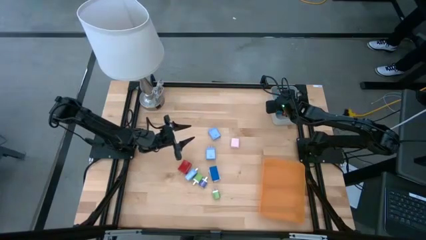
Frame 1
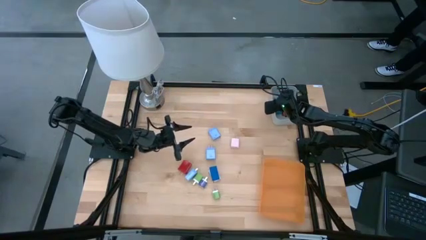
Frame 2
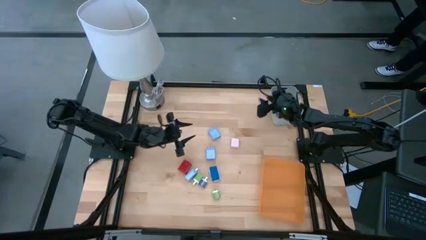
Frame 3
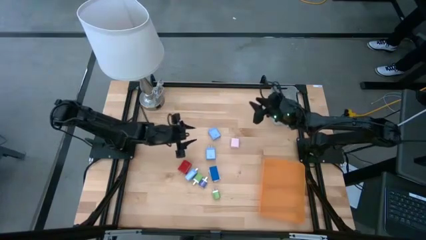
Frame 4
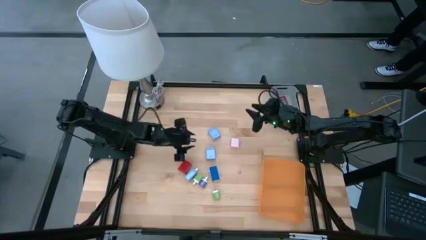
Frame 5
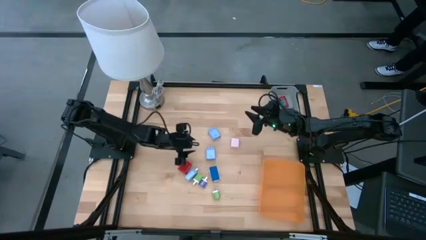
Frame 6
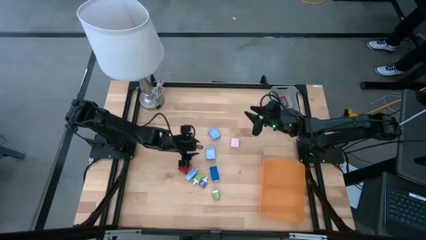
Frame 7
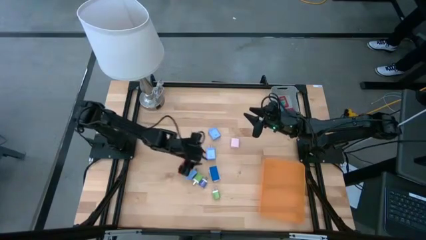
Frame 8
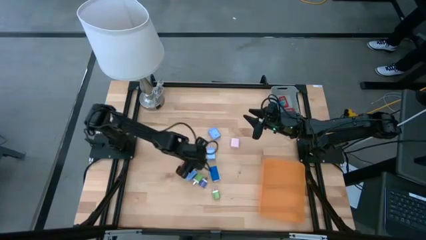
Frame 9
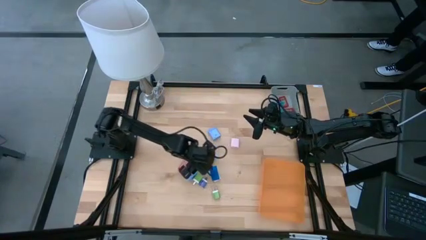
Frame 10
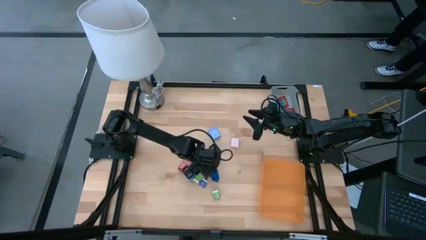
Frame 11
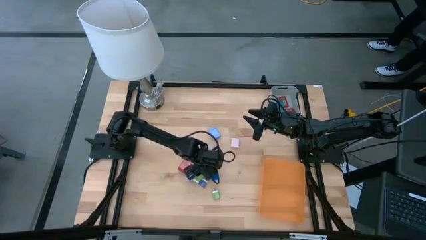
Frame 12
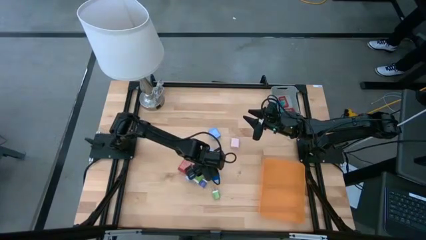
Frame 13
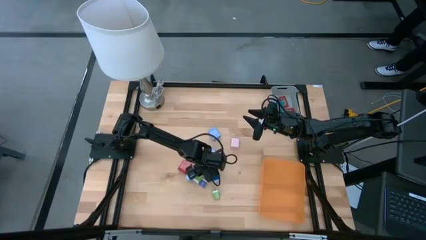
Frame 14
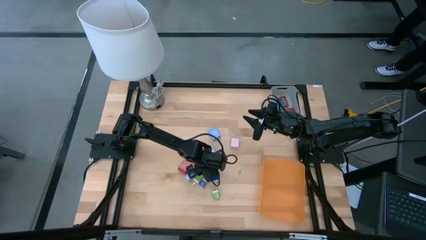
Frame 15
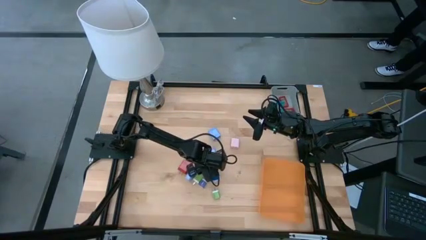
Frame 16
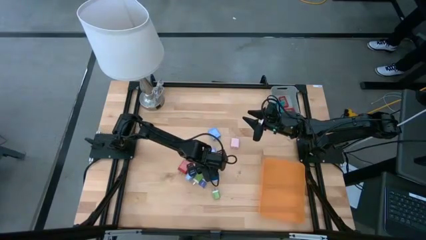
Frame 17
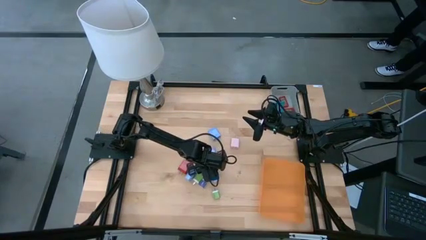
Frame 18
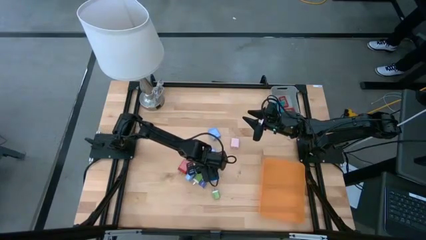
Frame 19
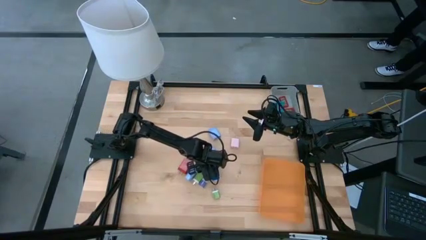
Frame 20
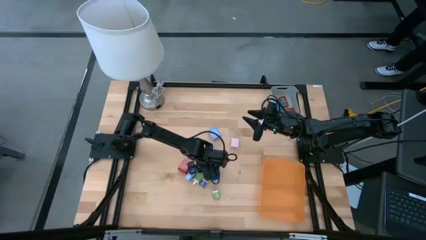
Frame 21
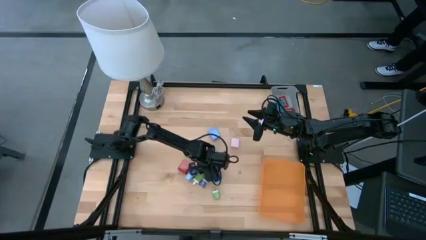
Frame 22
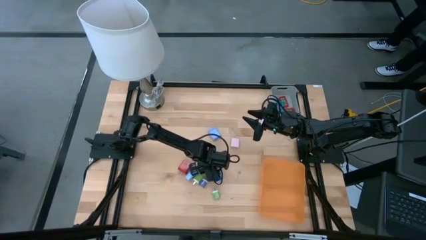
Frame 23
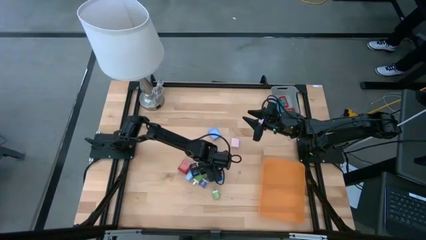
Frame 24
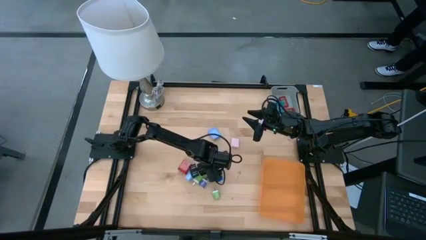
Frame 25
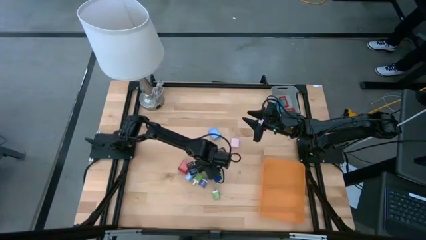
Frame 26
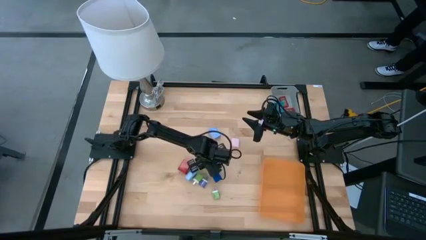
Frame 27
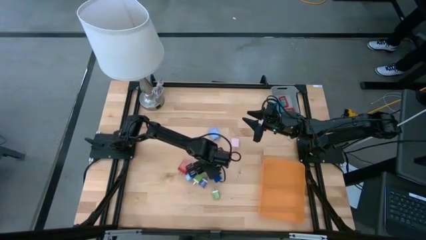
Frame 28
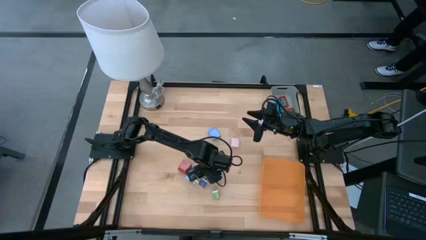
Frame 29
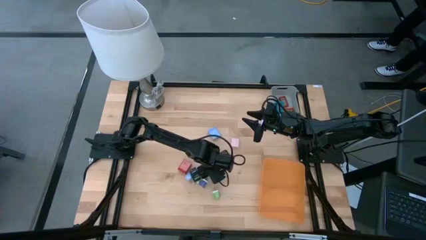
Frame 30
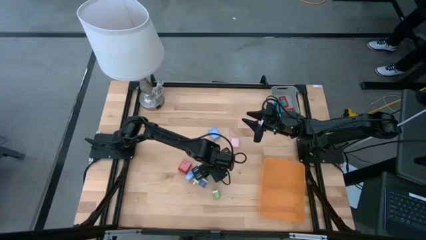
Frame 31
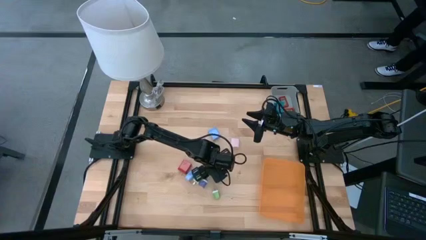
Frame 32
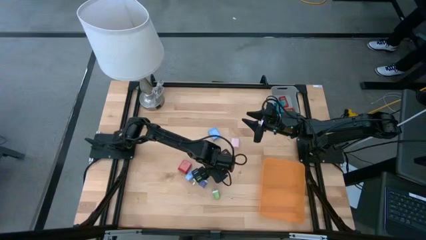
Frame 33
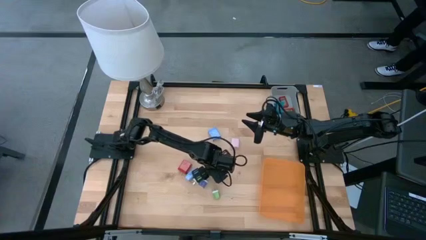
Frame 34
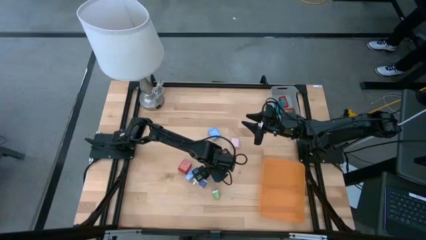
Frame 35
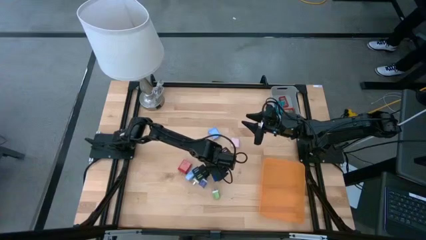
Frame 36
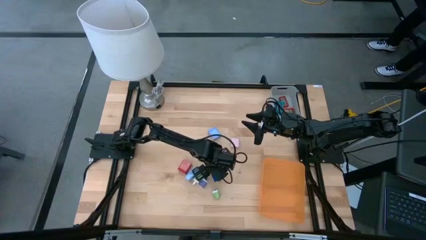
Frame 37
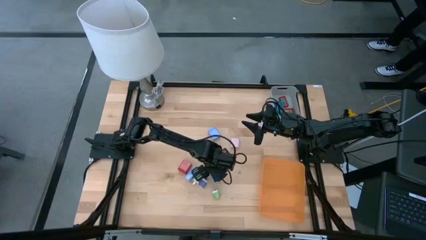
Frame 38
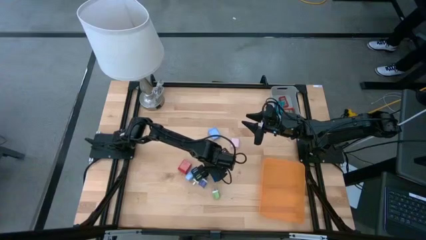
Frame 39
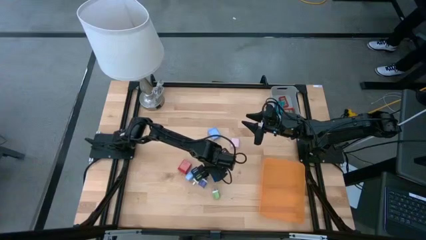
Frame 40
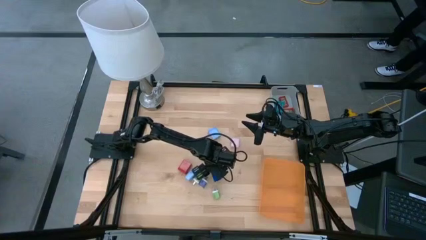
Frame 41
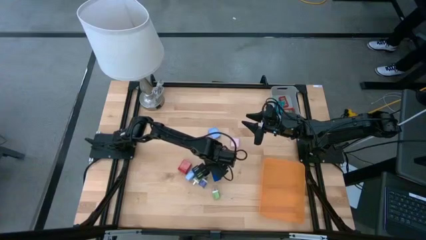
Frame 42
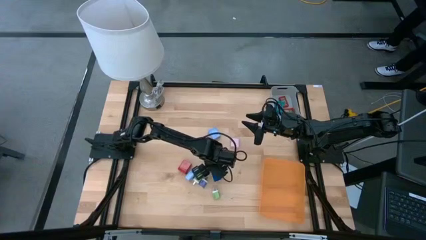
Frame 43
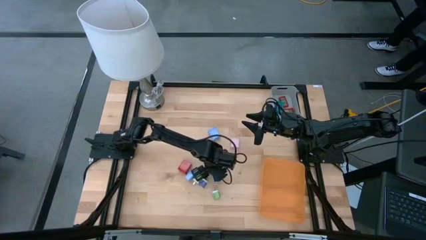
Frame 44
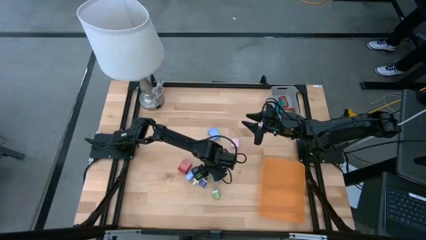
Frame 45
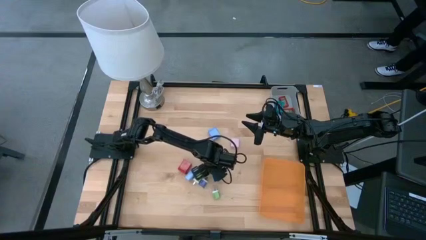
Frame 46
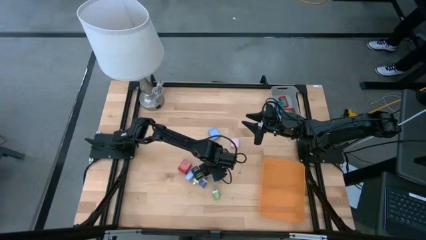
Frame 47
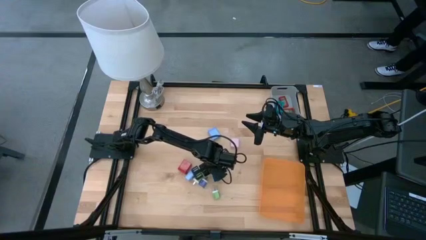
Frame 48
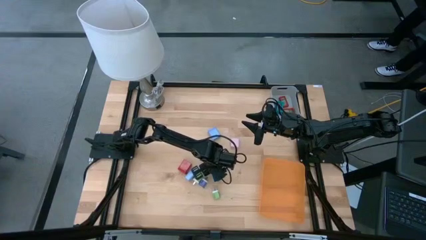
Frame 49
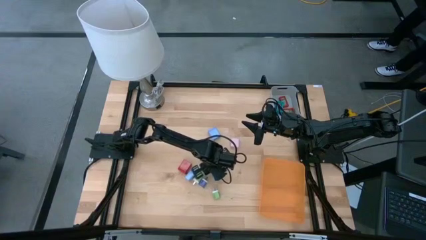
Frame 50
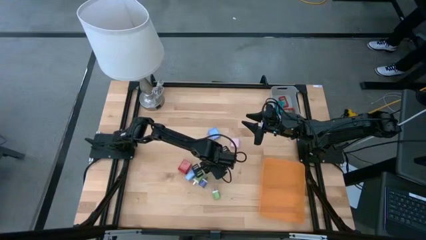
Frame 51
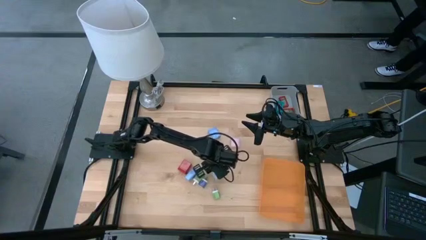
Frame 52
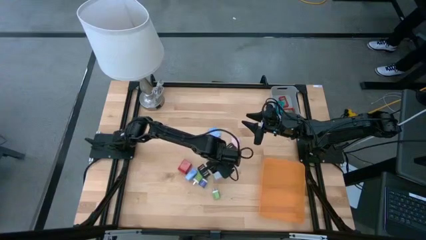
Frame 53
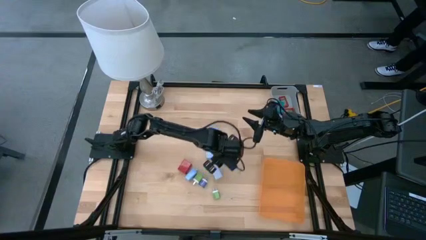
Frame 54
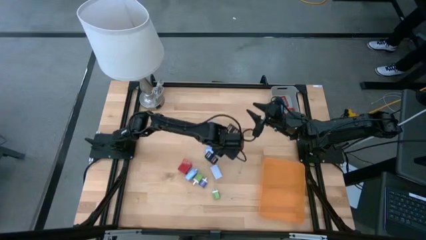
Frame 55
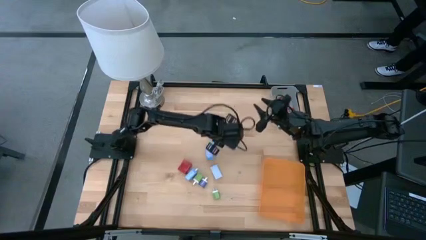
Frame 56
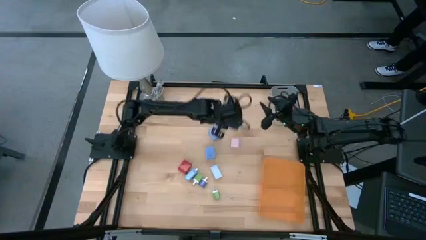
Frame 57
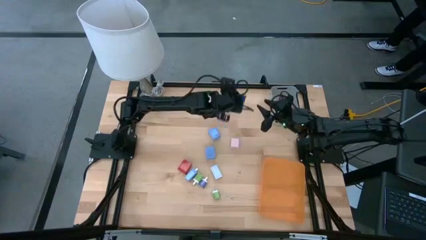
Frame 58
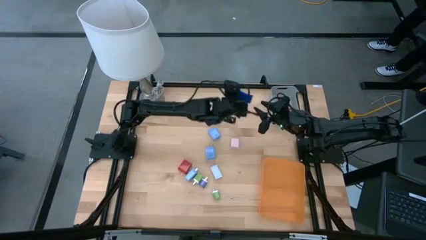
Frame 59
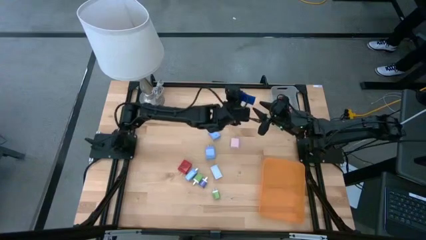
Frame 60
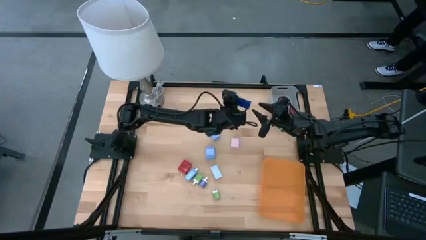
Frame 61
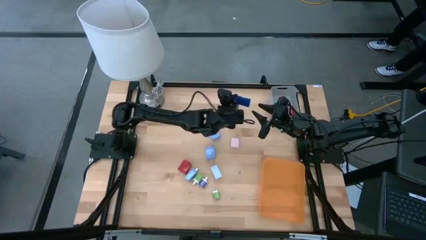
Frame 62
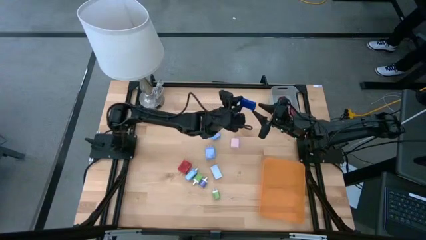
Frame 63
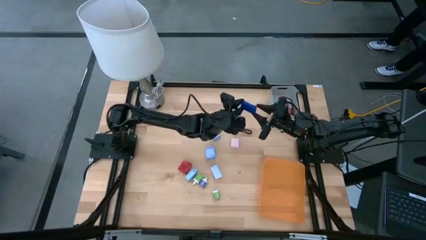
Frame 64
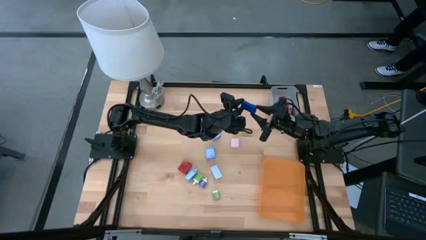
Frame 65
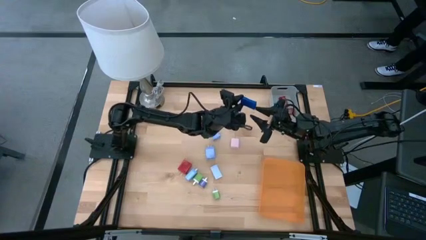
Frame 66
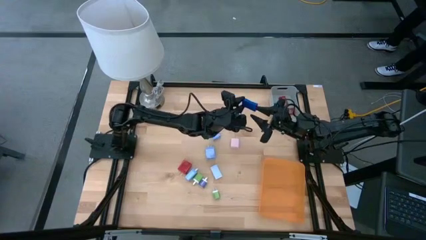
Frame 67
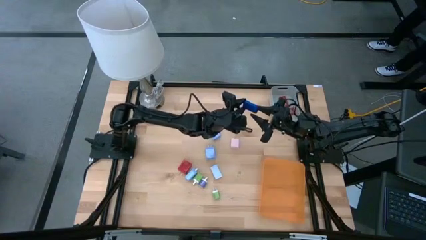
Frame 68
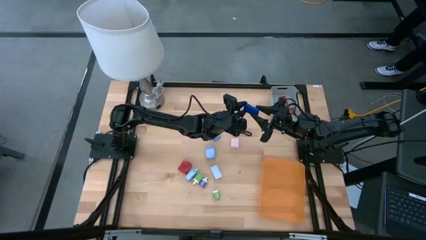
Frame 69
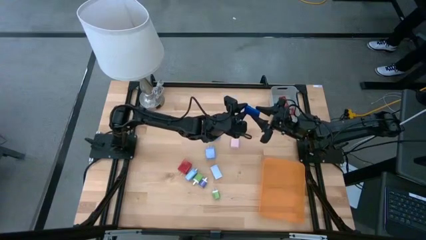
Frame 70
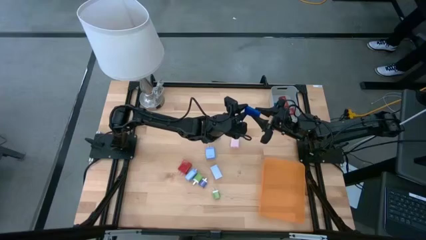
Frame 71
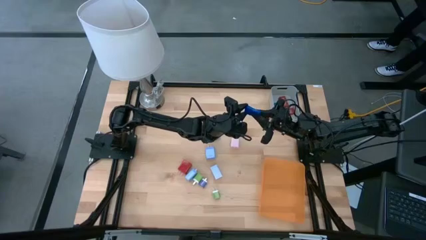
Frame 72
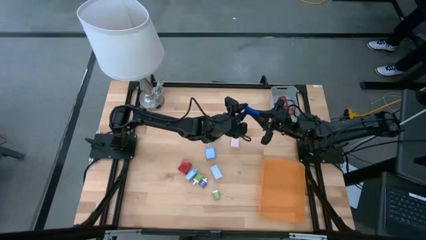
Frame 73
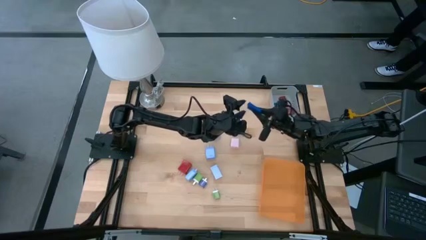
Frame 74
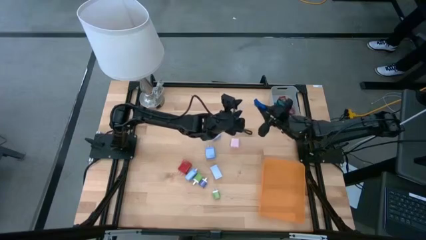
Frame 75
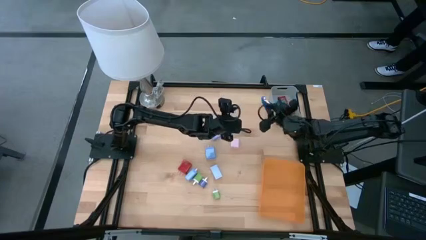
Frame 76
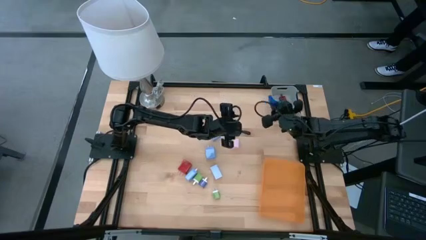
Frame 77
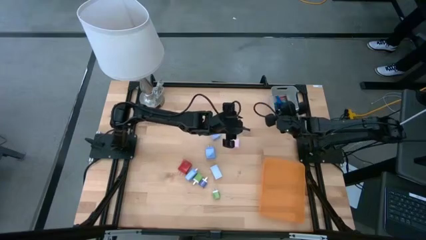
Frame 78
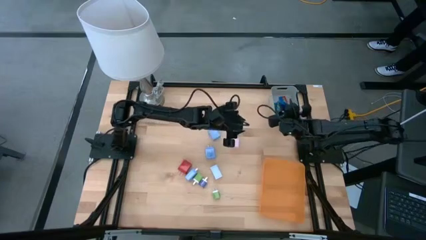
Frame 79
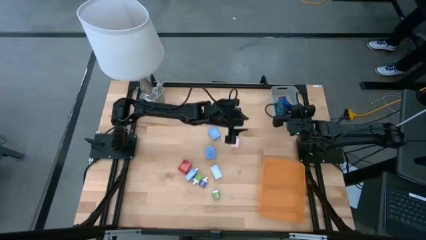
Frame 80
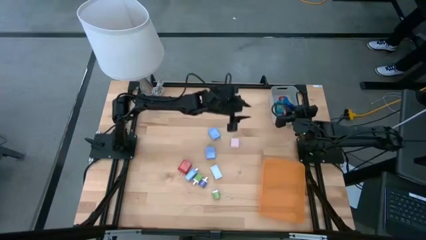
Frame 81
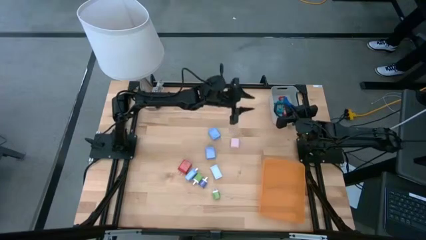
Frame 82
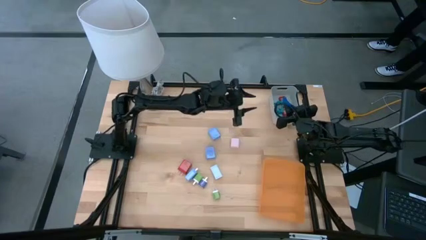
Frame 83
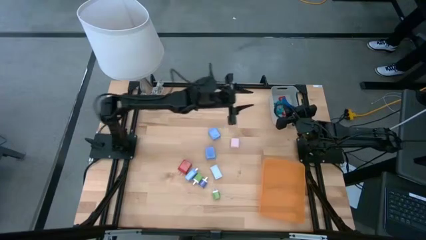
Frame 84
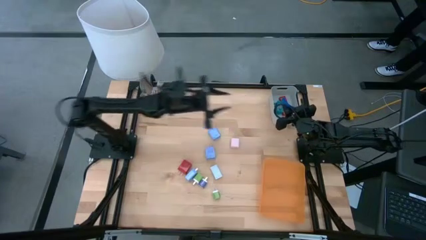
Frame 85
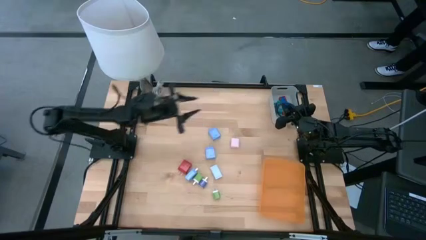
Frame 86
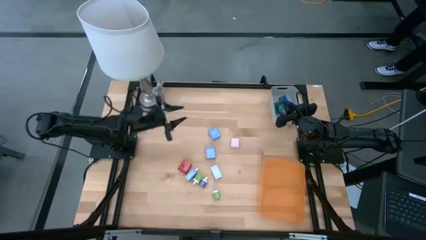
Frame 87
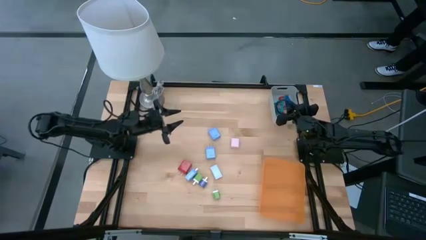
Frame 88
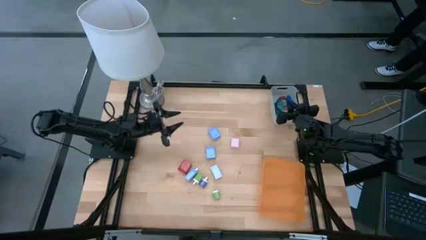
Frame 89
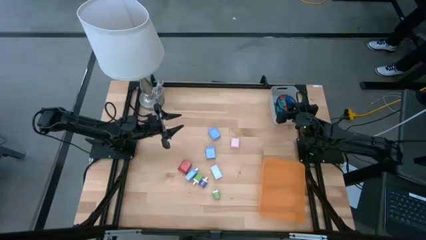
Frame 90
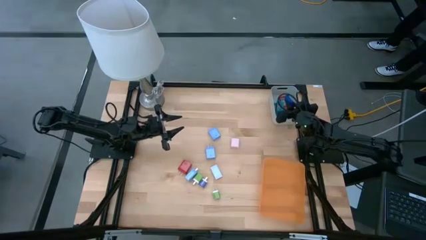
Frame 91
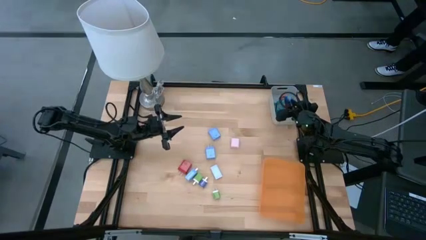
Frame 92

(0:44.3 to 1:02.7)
Task: Pick & Place Office items
Put the dark blue digital clock into the gray bin
